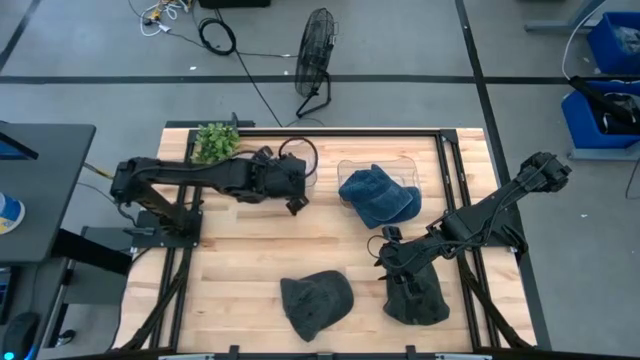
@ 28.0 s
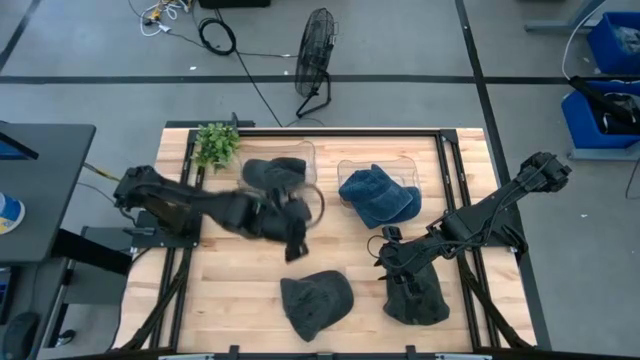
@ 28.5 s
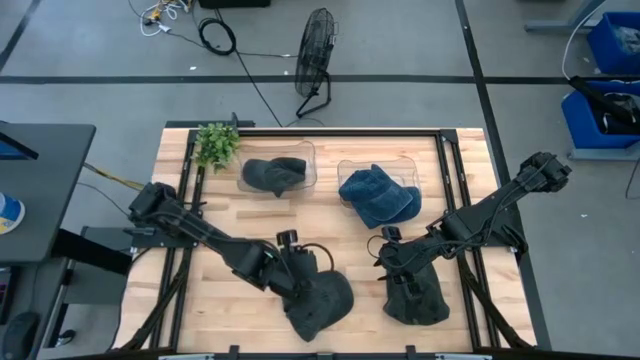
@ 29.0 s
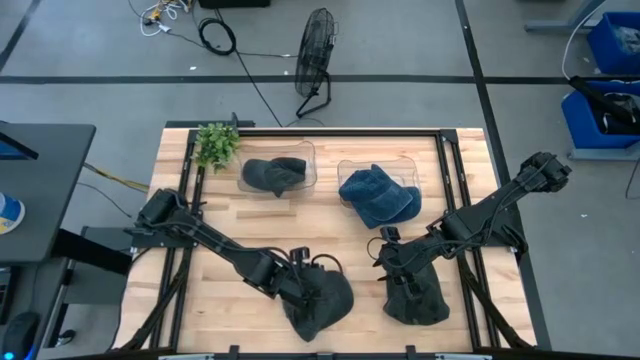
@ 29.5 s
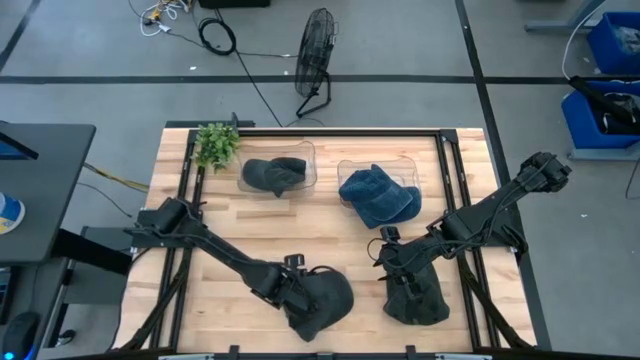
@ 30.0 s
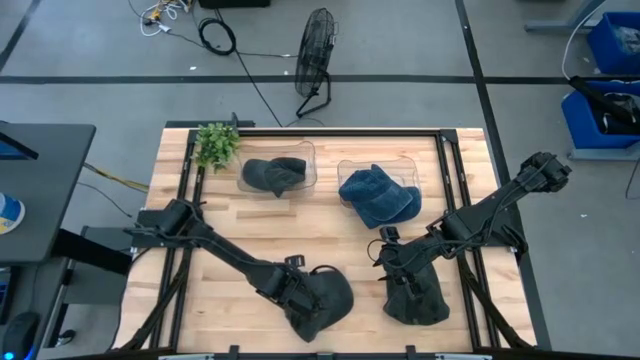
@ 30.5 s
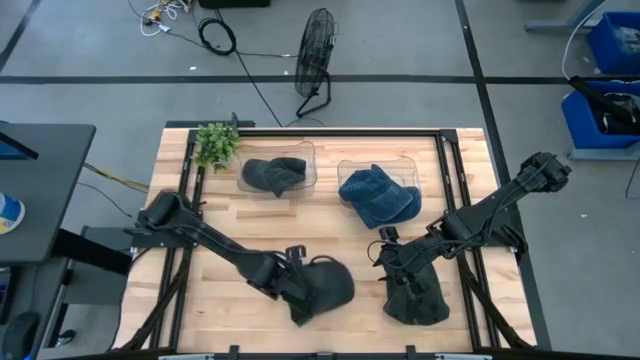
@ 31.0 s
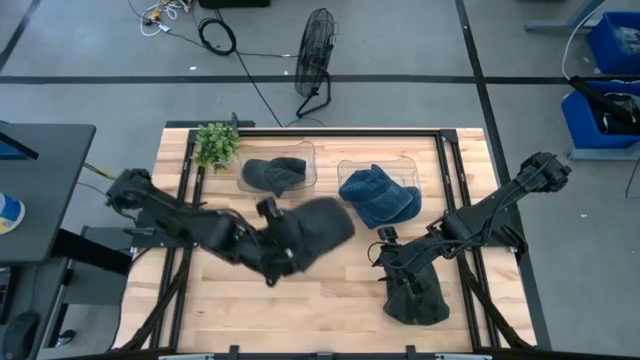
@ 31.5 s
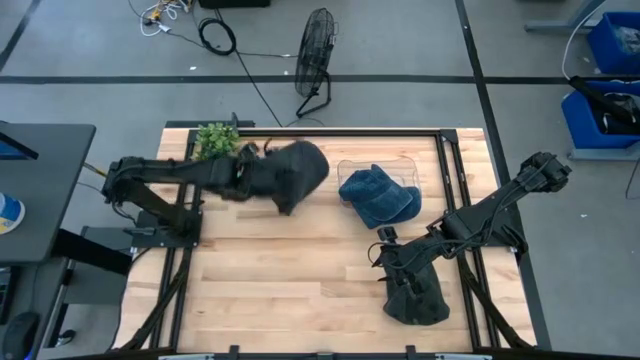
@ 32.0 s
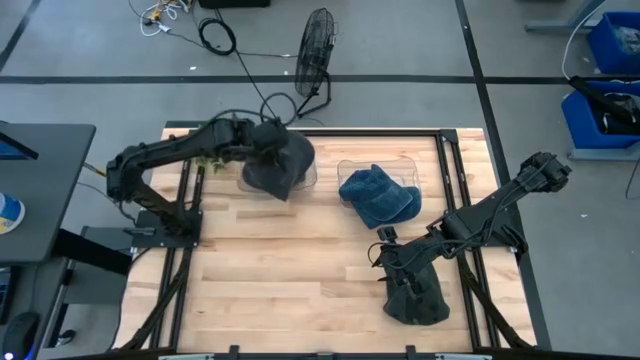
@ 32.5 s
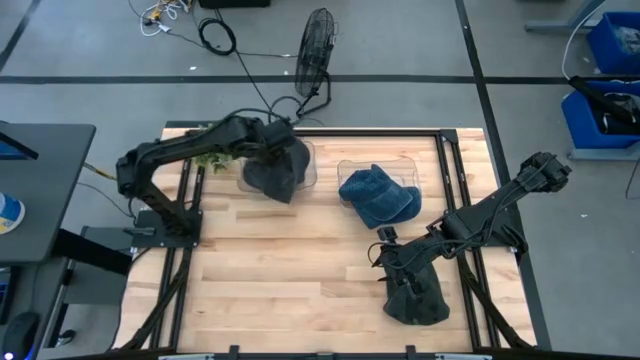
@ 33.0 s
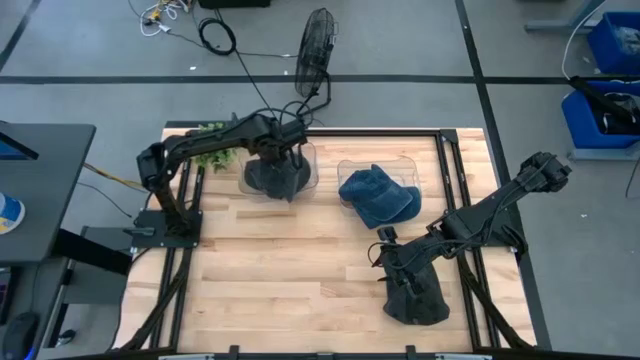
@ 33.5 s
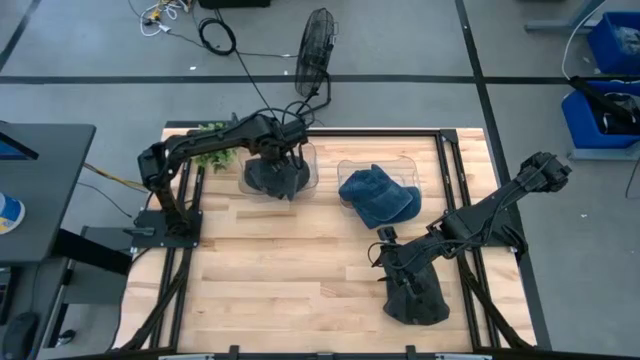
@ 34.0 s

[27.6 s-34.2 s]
Task: Pick & Place hat
Put the left black cap into the left transparent bin

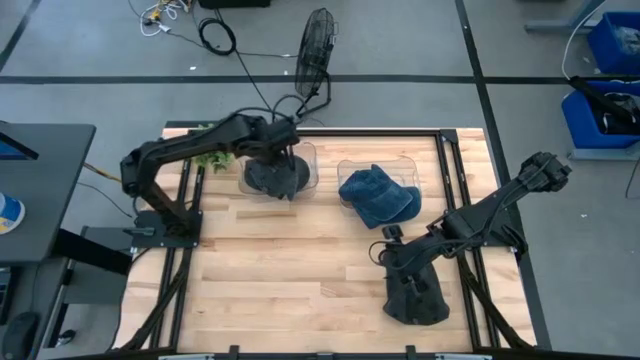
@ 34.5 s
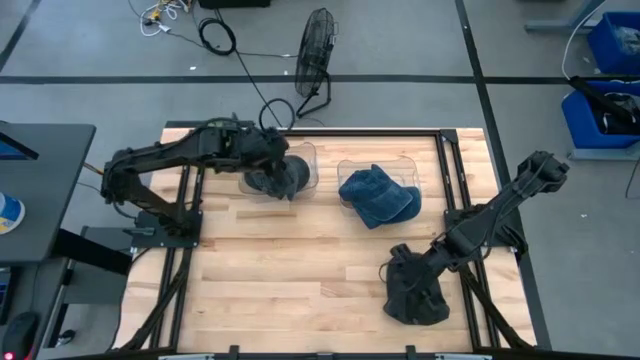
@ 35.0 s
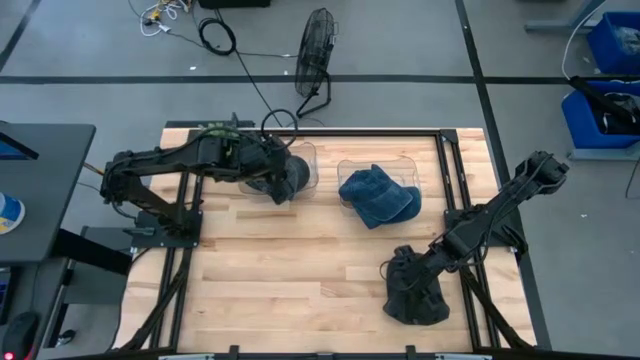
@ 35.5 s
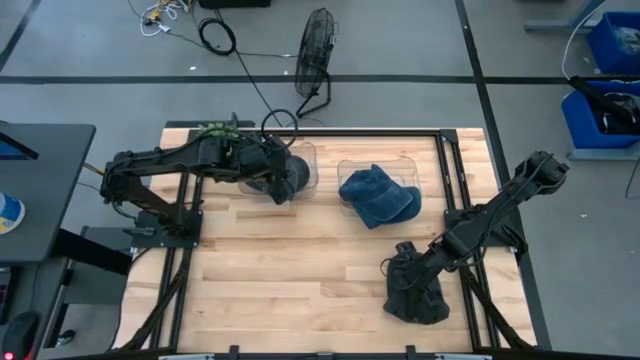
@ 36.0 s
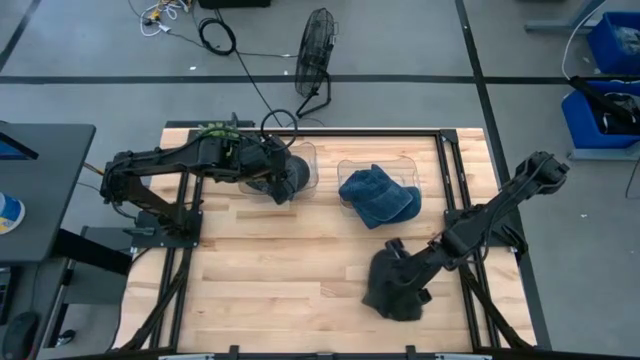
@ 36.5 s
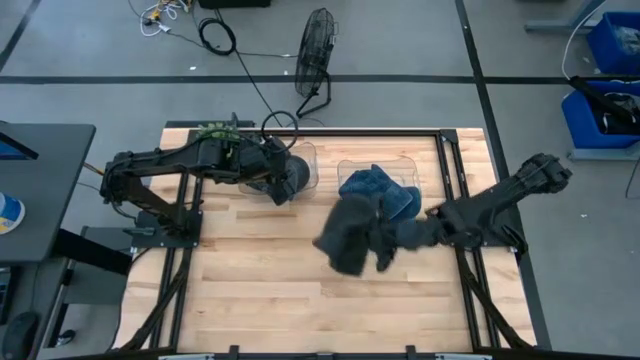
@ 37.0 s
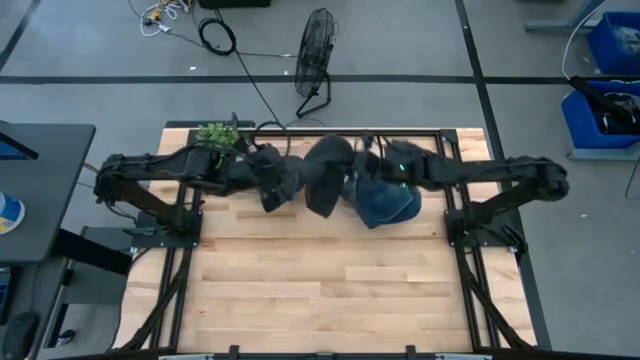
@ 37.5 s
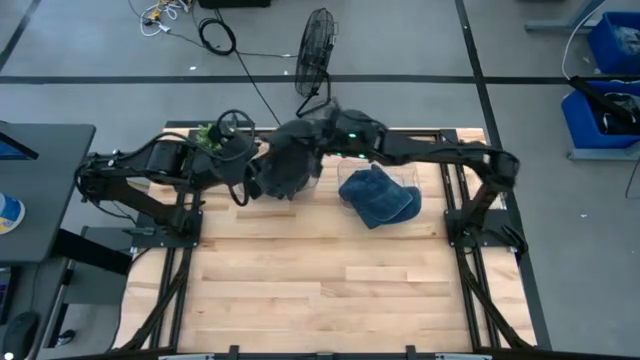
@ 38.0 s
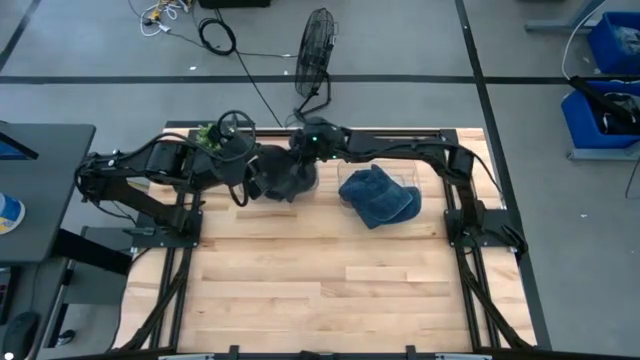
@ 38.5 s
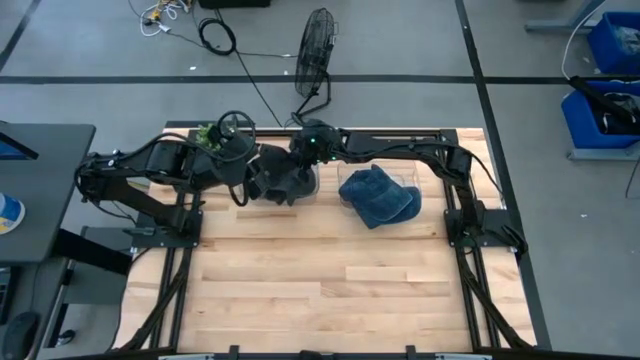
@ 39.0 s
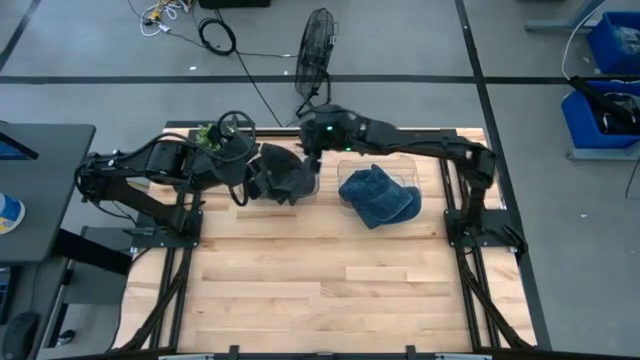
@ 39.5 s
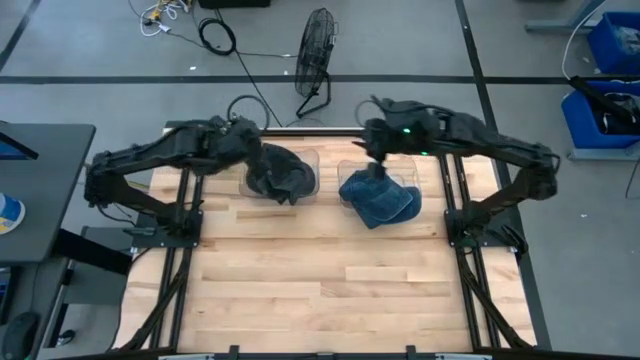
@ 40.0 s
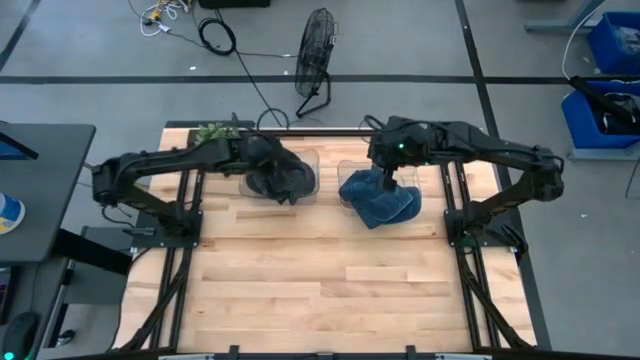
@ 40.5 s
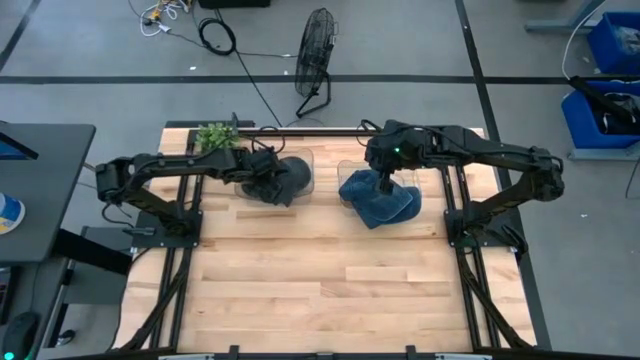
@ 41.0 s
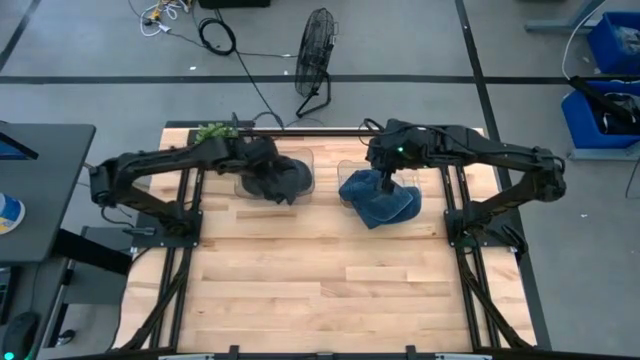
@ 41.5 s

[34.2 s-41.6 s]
Put the black cap into the left transparent bin

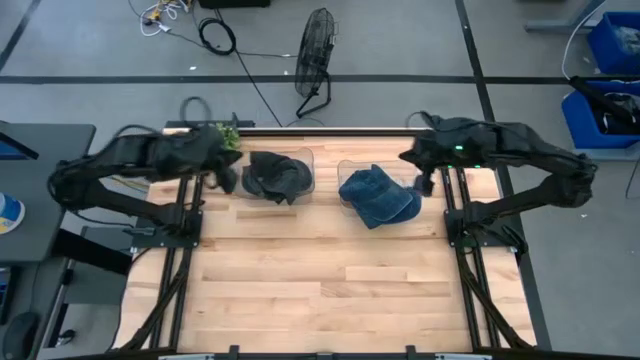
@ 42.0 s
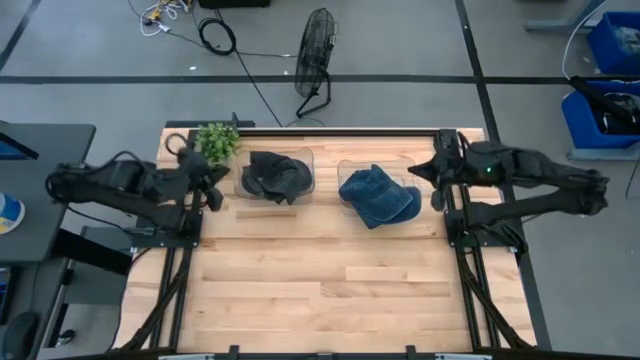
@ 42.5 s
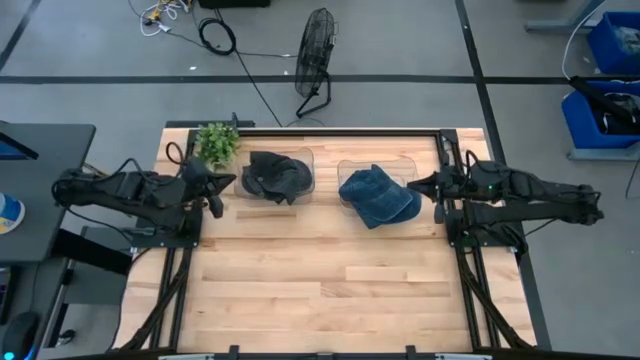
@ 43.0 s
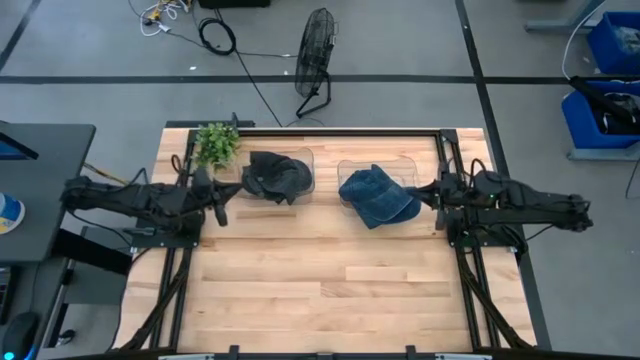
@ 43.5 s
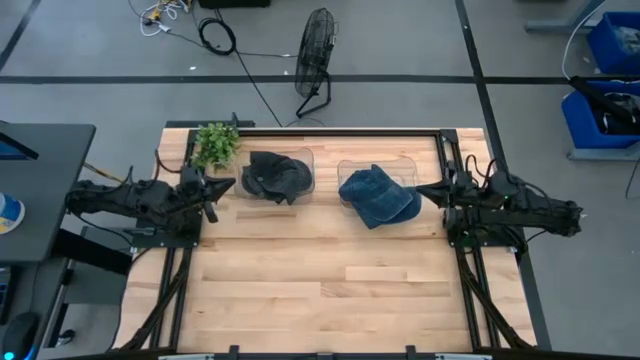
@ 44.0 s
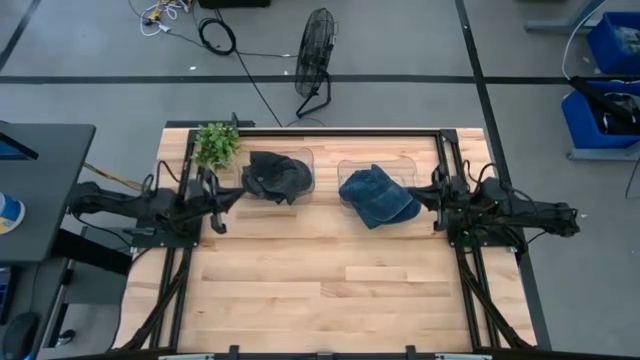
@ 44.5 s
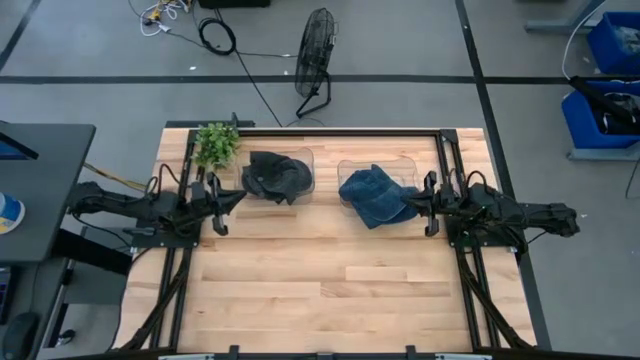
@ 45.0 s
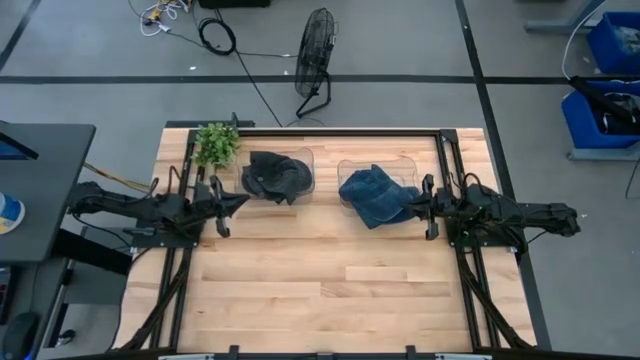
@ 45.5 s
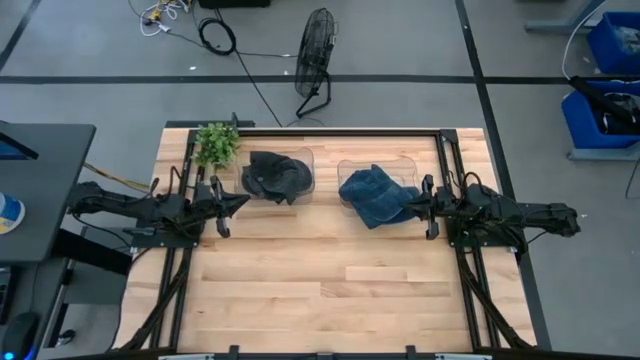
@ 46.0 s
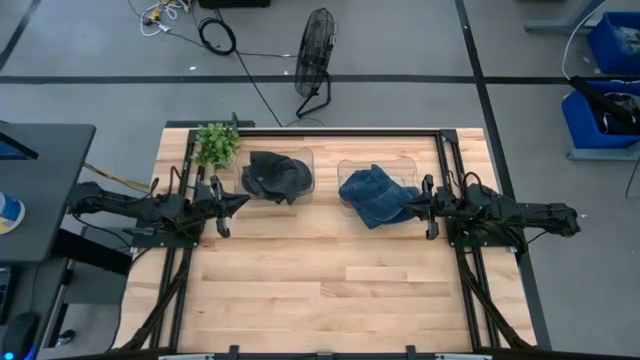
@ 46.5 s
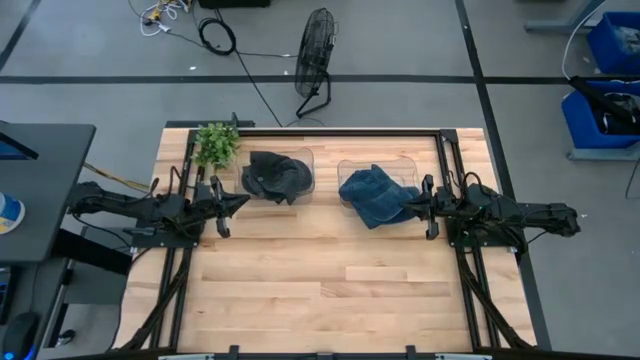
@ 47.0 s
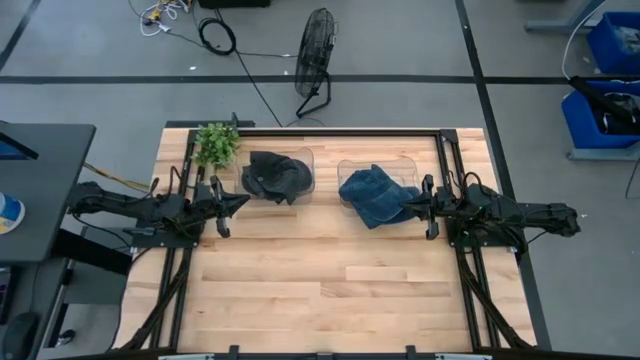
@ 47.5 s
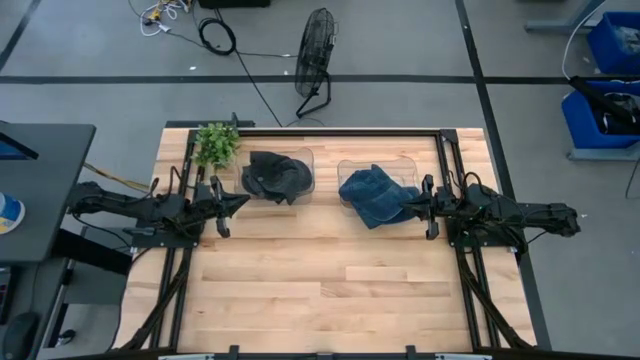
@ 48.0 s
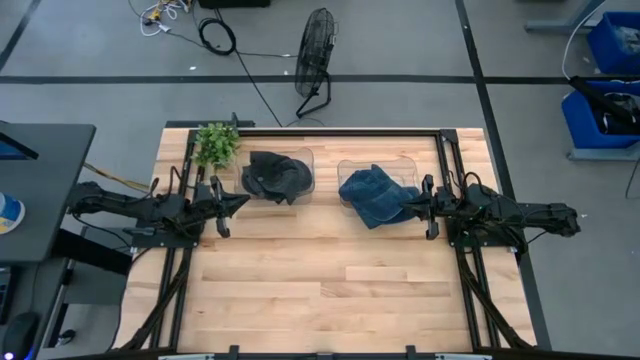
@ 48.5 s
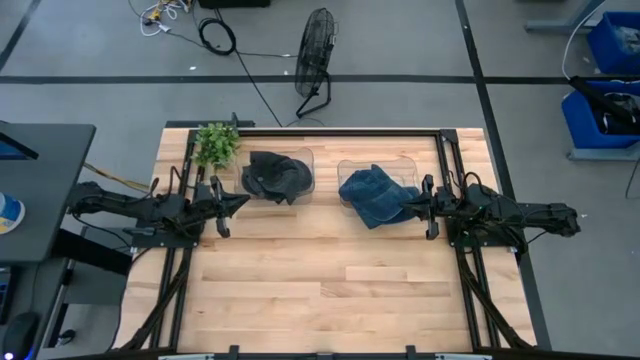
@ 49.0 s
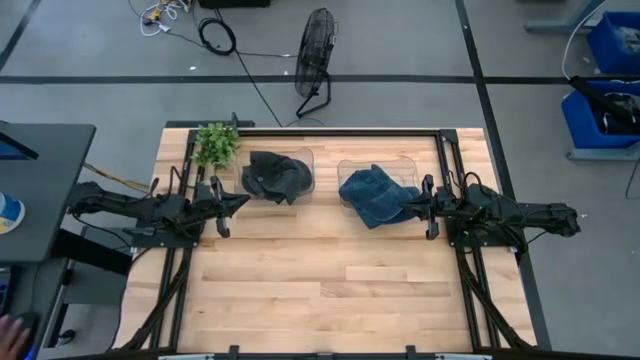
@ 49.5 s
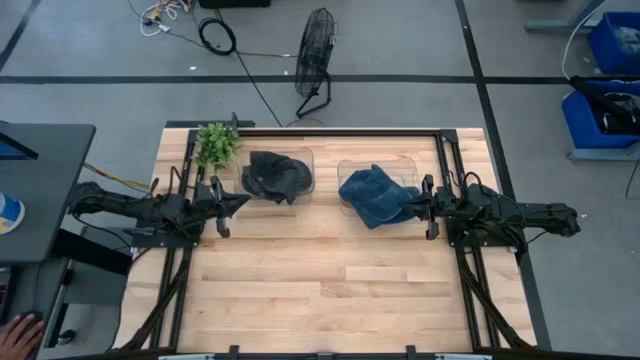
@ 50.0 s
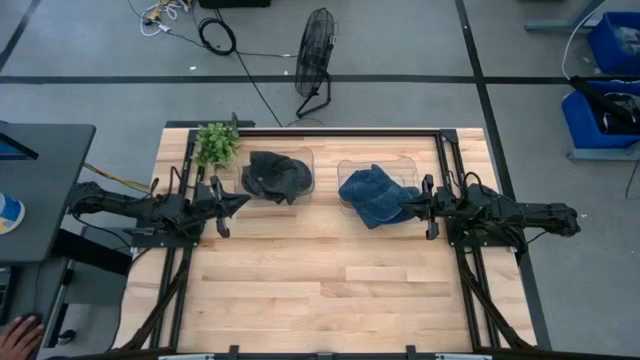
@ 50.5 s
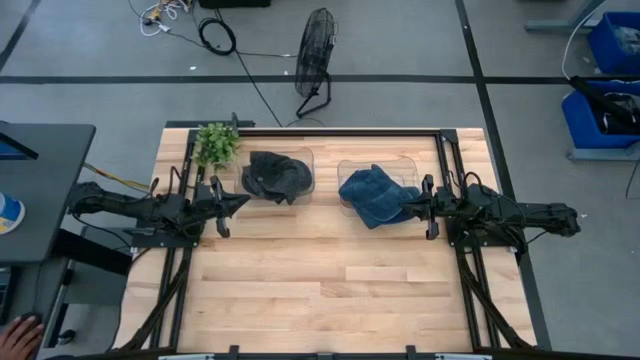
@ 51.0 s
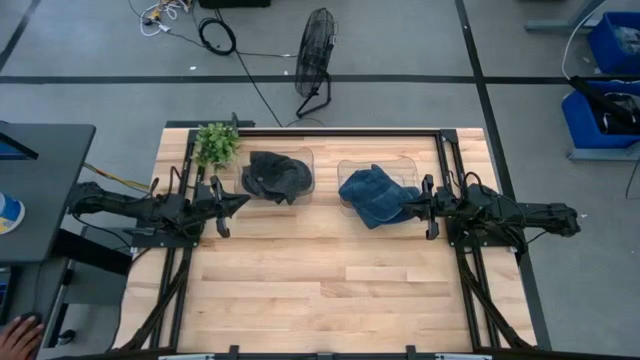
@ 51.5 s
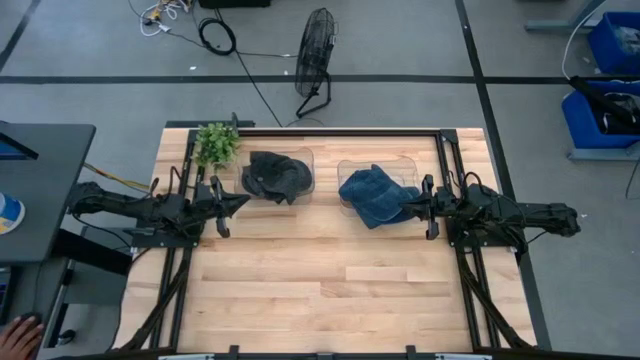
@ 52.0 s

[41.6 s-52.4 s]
Return to Home Position
